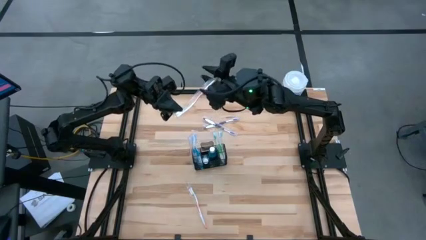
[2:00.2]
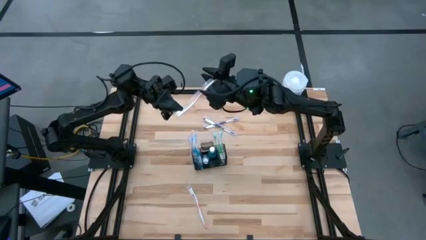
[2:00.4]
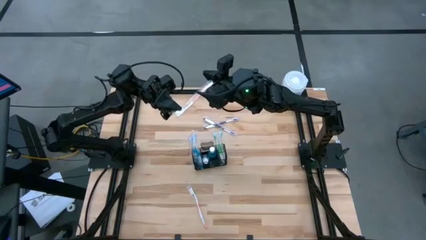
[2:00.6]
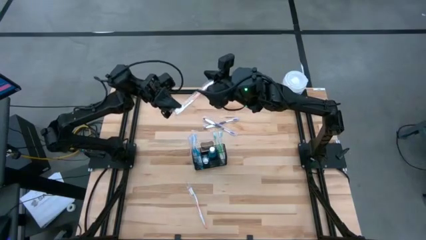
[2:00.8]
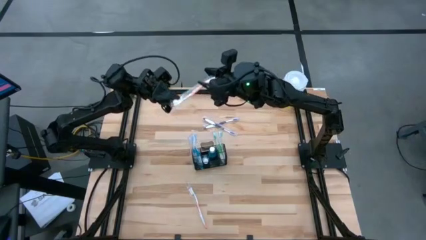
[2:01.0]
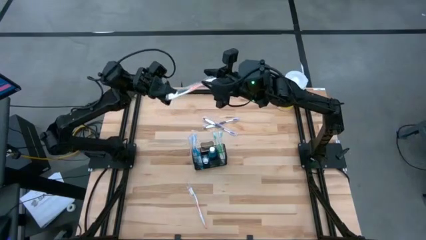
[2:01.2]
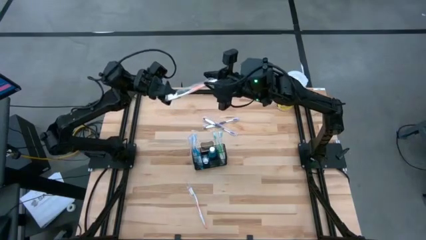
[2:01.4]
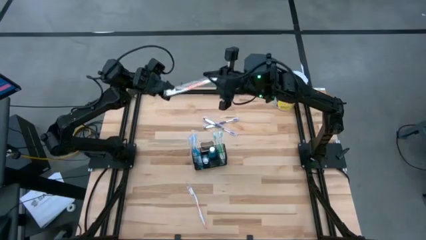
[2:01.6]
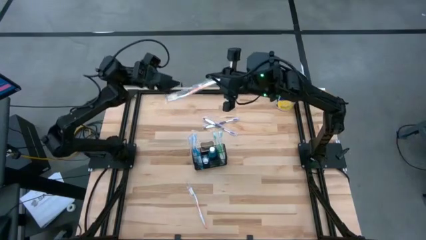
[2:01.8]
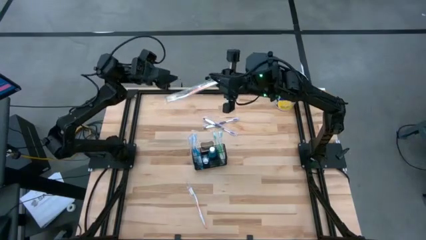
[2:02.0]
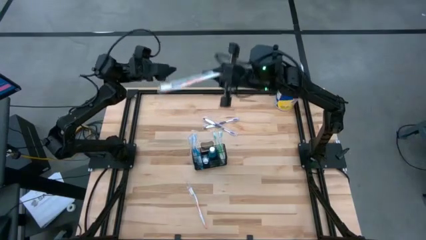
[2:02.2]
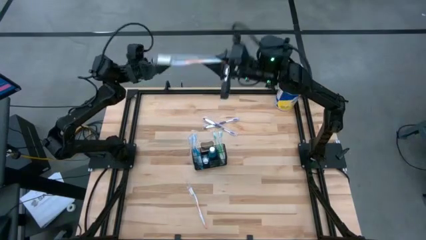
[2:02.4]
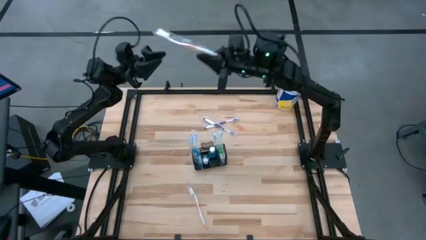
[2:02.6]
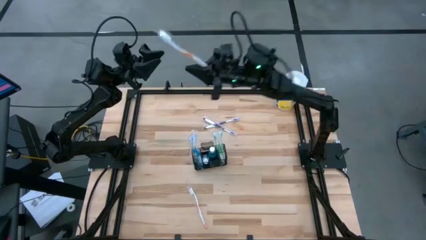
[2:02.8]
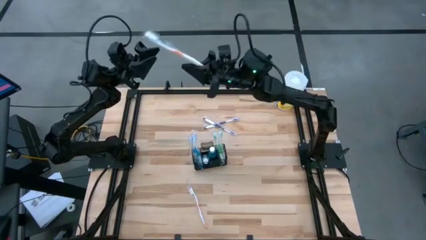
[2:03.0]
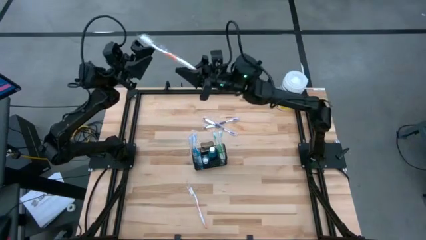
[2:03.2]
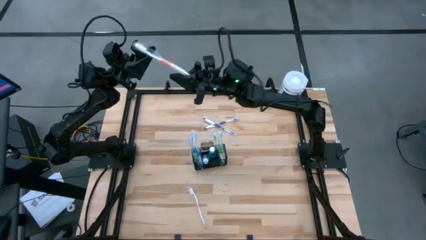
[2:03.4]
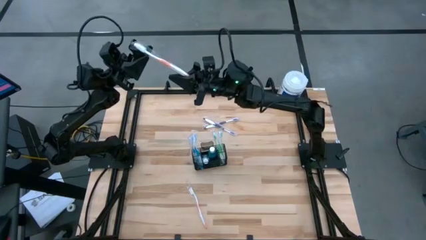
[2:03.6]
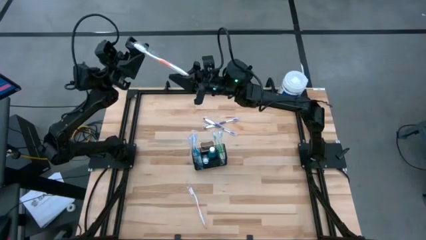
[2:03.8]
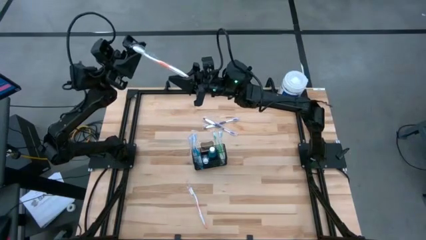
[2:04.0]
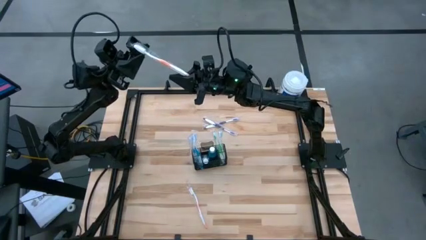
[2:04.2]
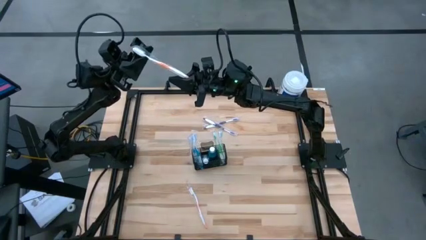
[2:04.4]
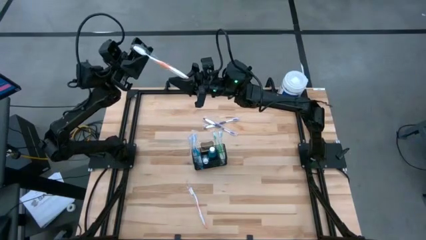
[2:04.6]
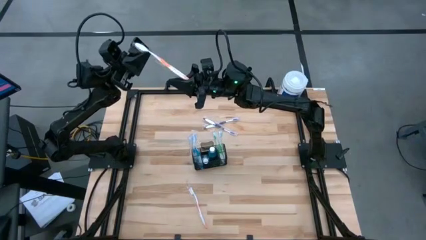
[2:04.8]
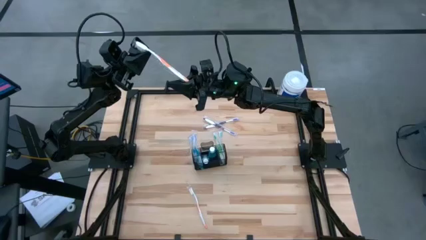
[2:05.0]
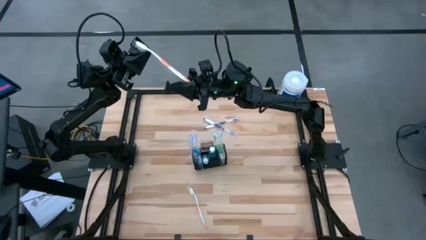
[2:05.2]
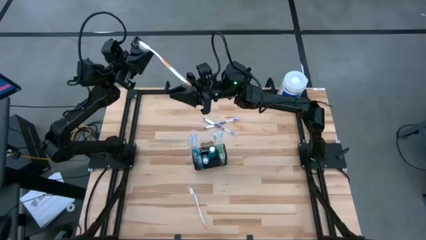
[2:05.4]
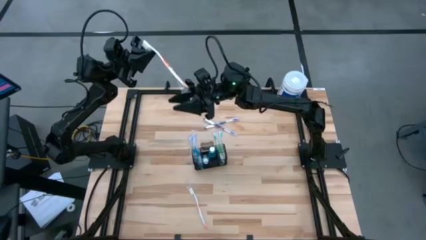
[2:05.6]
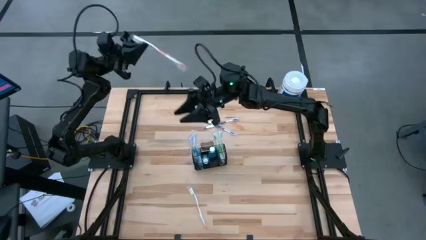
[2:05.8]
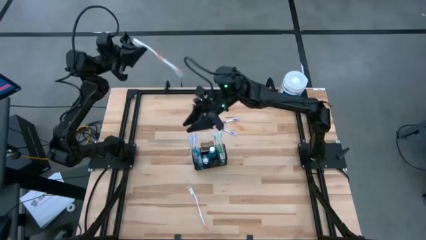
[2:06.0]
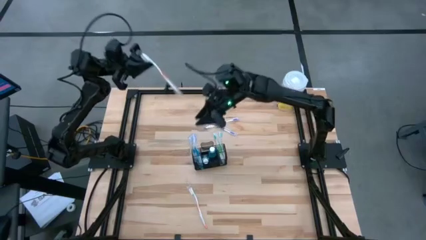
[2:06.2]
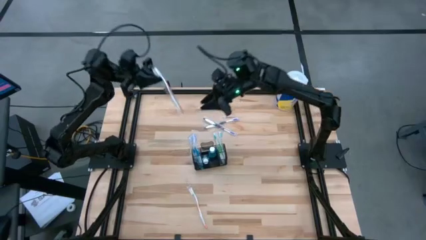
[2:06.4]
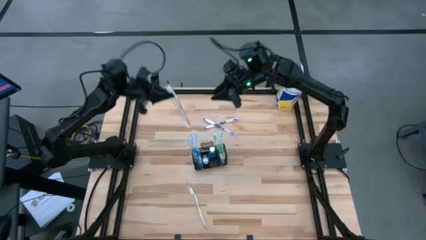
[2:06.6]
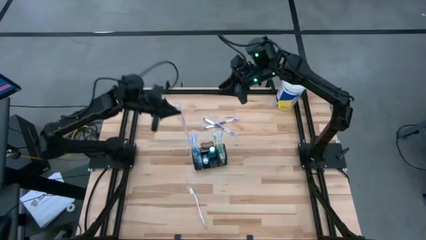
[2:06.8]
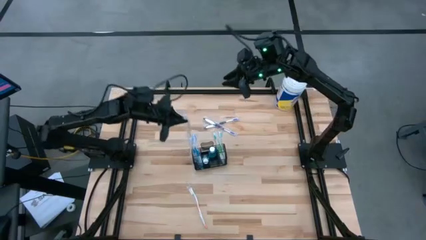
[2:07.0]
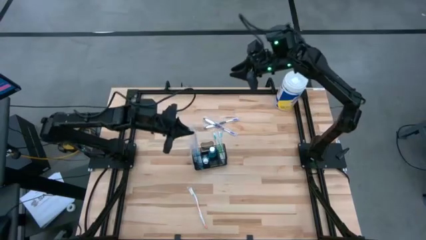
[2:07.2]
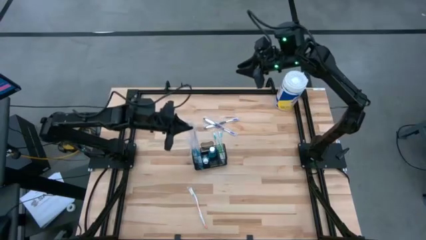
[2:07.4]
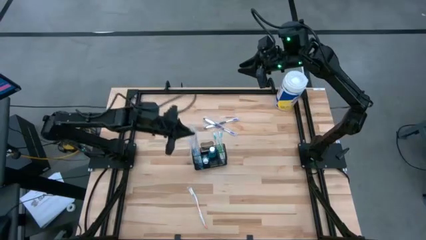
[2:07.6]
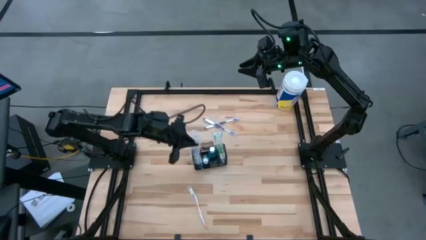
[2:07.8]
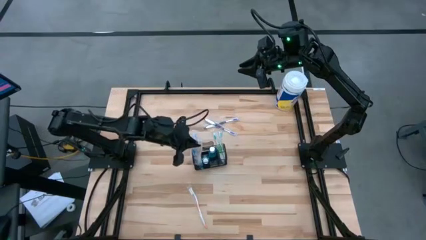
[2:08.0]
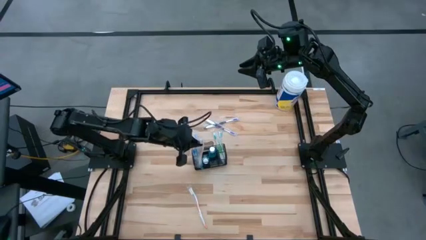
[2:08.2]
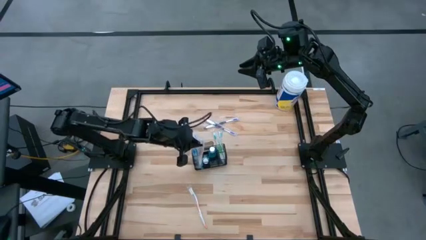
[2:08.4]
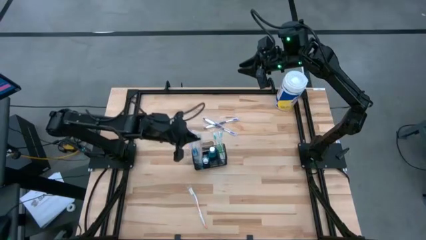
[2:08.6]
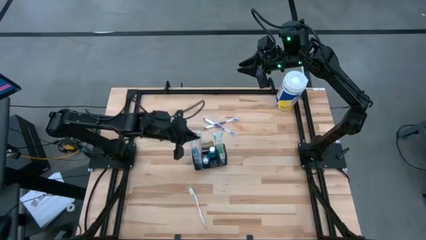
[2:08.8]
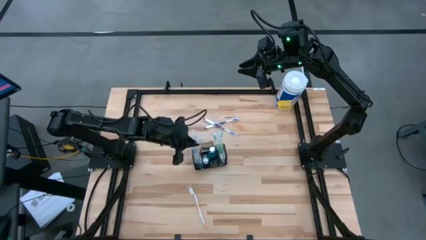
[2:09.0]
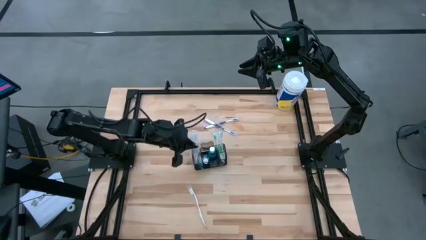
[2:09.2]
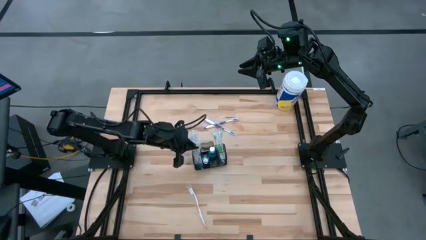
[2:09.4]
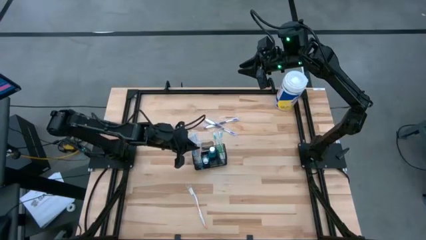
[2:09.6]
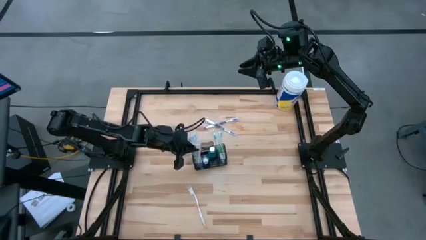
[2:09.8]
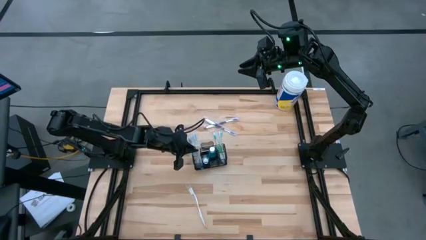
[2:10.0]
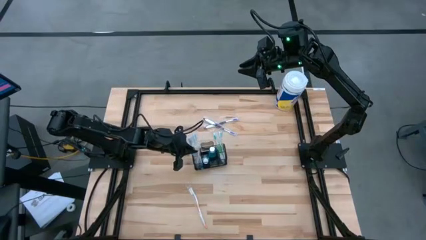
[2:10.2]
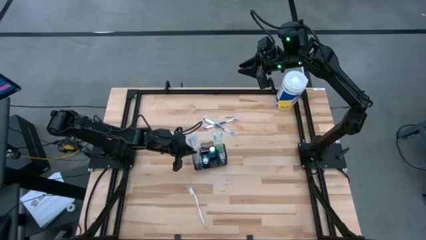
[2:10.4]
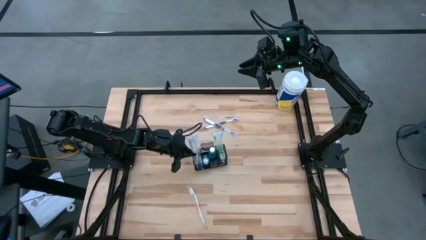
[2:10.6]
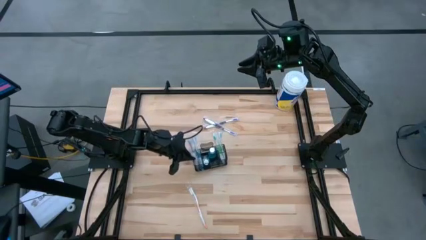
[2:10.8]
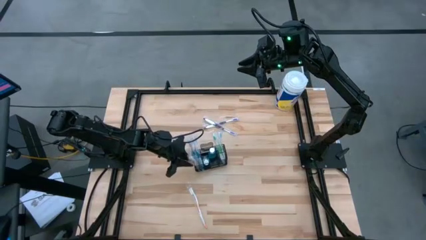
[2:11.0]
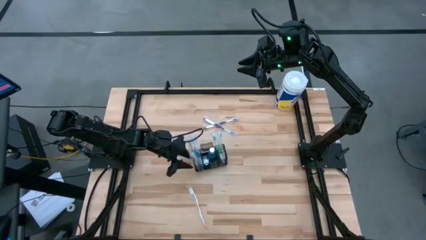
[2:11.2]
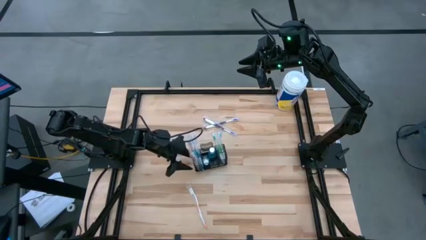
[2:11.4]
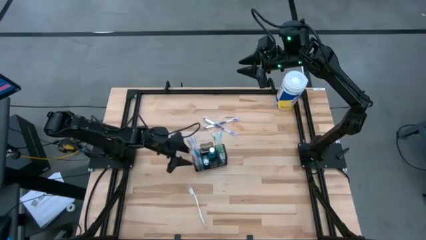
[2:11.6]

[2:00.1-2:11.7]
Task: Pick & Place toothbrushing station
Put the left orange toothbrush into the mesh organizer

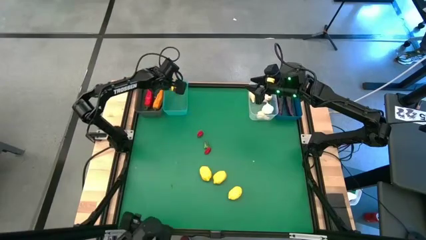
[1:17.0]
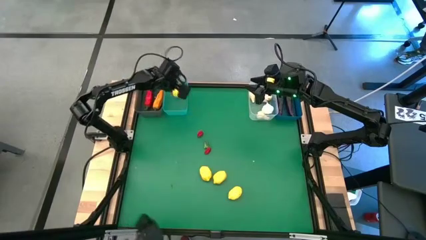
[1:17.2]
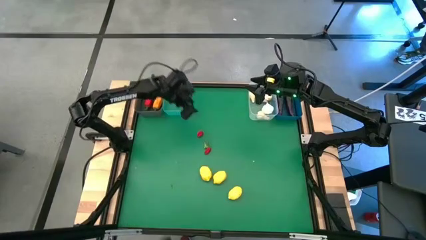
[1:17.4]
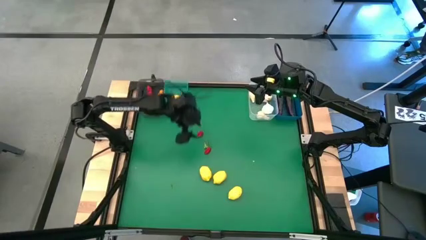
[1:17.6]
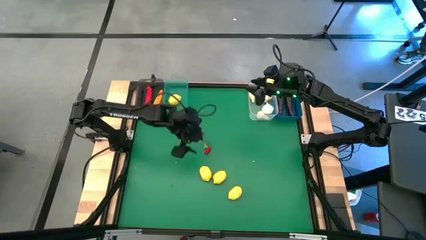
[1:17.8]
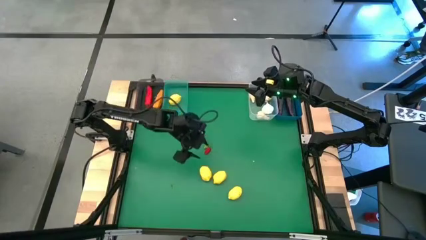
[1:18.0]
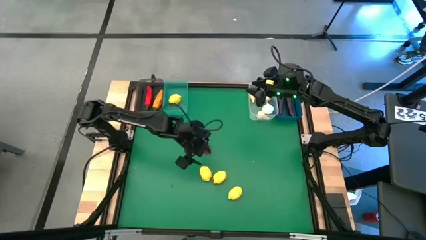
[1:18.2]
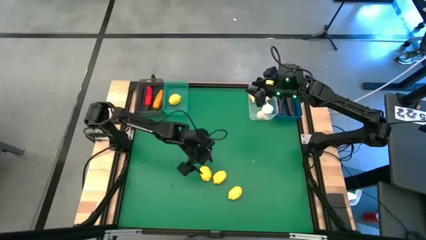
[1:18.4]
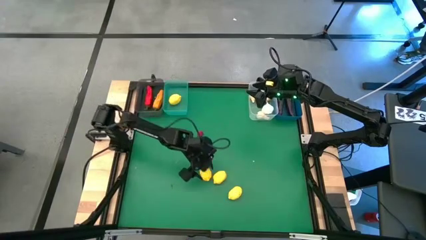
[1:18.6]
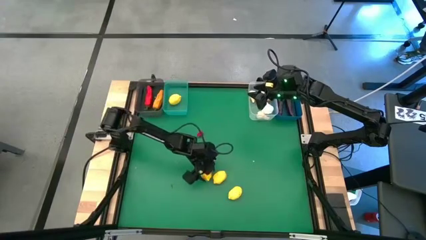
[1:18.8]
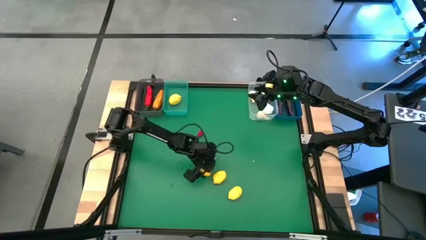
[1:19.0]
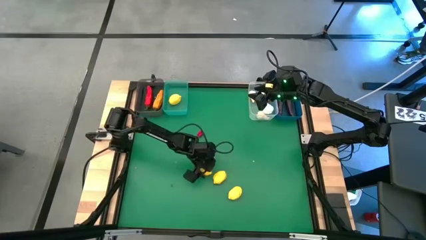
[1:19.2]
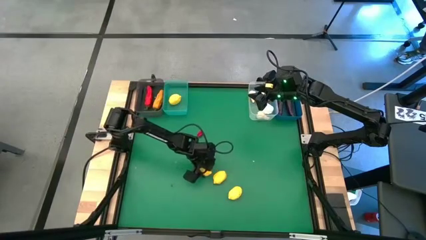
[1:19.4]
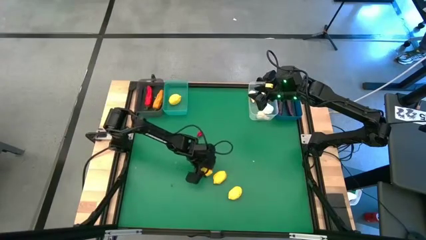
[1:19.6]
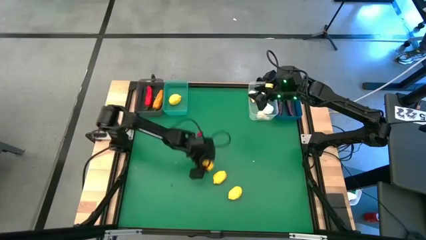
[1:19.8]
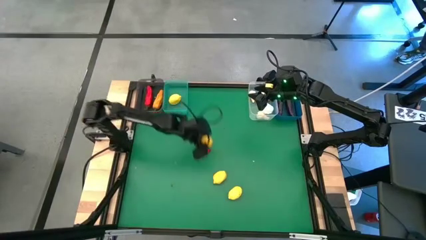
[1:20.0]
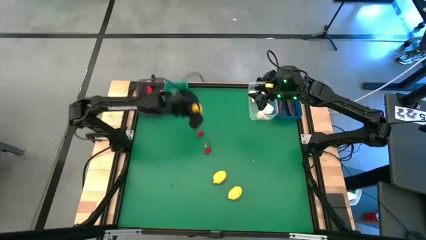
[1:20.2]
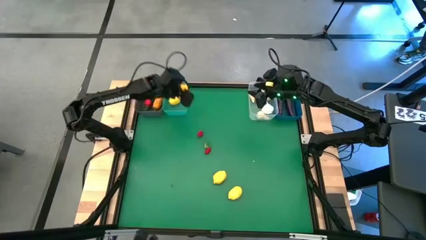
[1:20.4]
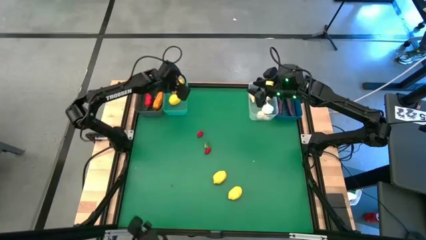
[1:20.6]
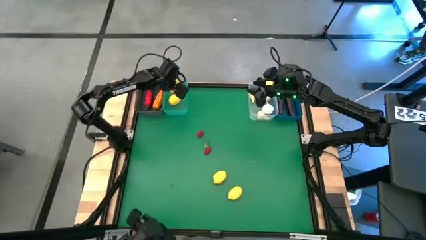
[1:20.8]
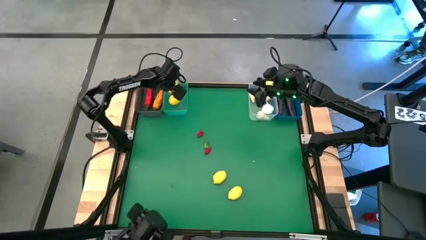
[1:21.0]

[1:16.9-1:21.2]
Task: Sort produce into baskets
Put the left lemon into the transparent light blue bin
